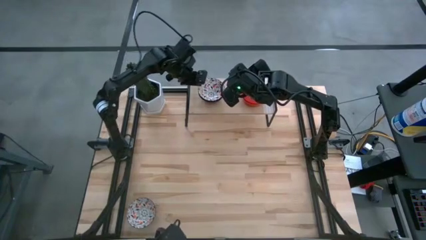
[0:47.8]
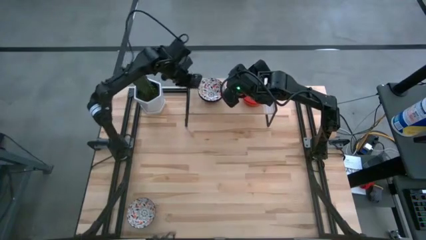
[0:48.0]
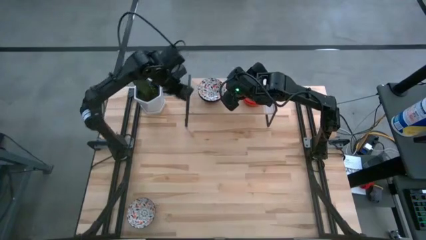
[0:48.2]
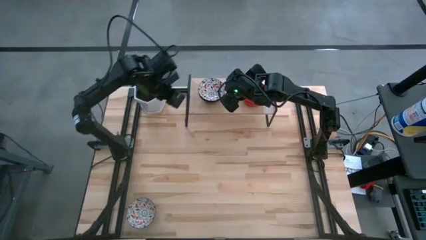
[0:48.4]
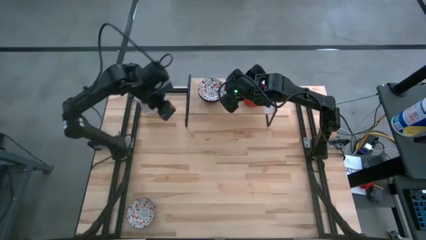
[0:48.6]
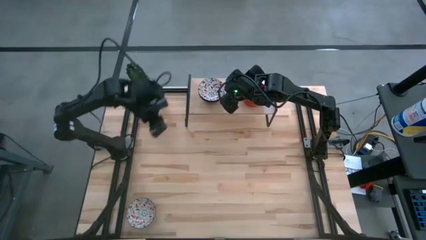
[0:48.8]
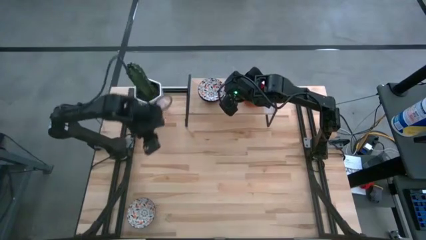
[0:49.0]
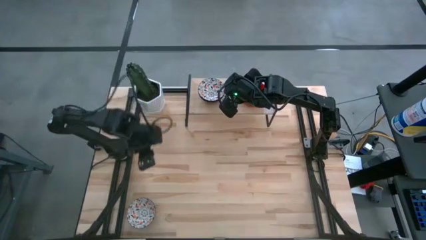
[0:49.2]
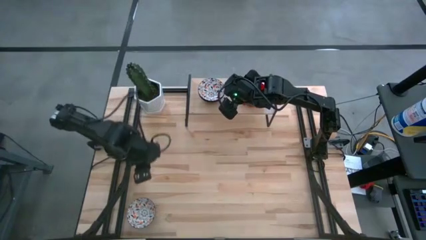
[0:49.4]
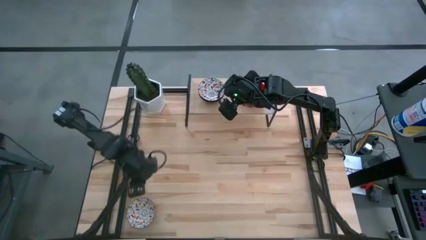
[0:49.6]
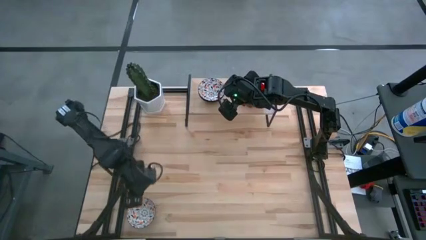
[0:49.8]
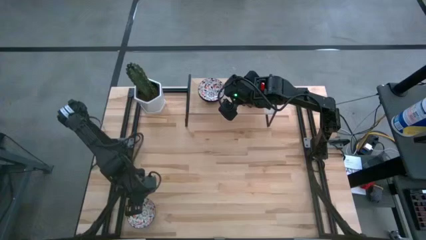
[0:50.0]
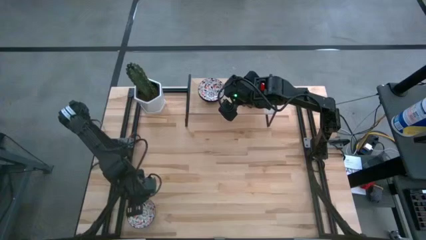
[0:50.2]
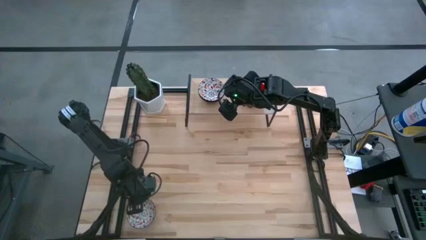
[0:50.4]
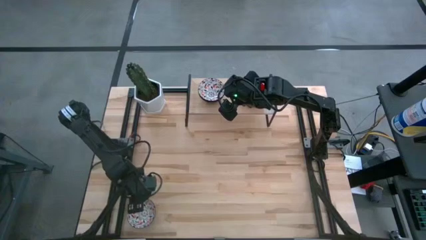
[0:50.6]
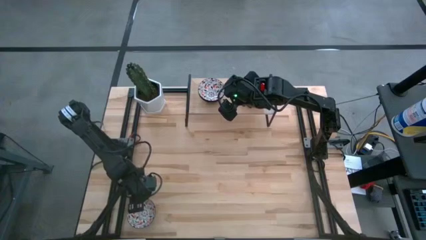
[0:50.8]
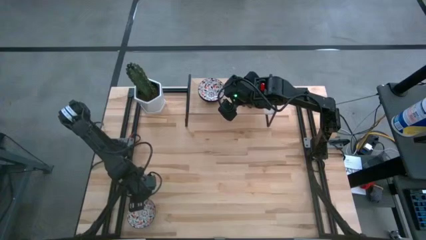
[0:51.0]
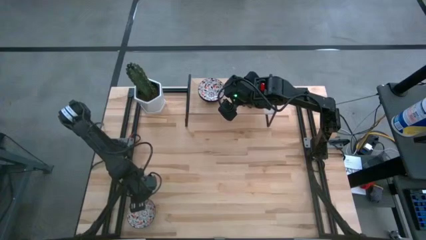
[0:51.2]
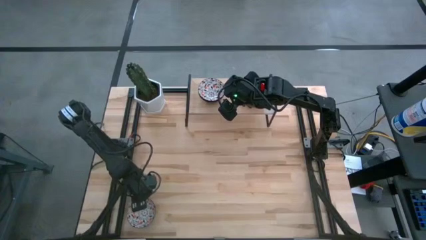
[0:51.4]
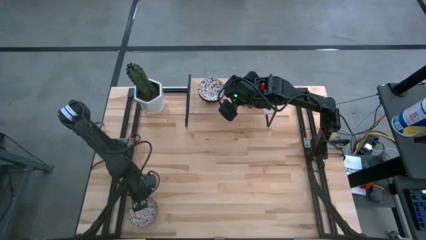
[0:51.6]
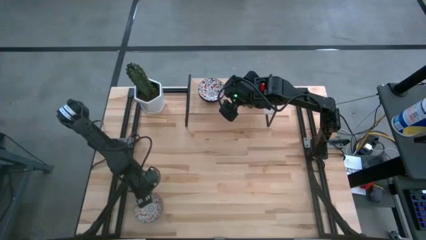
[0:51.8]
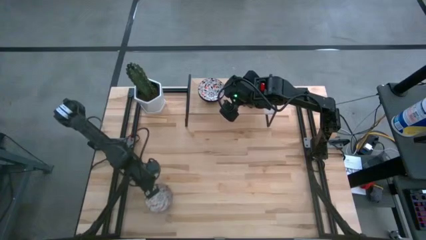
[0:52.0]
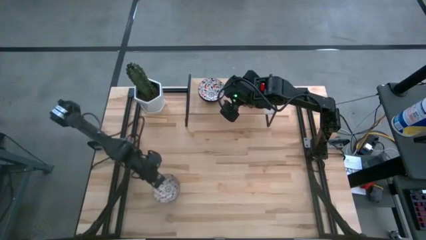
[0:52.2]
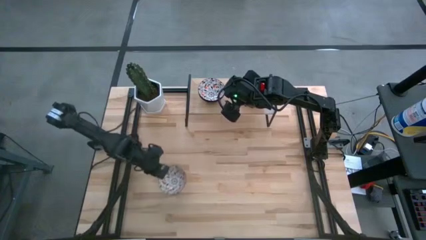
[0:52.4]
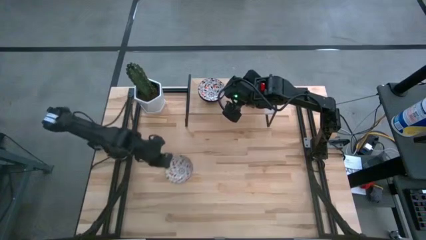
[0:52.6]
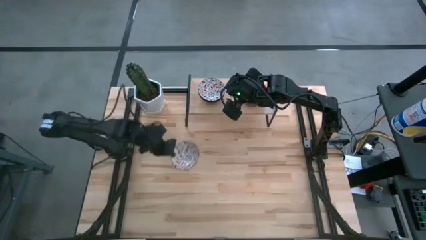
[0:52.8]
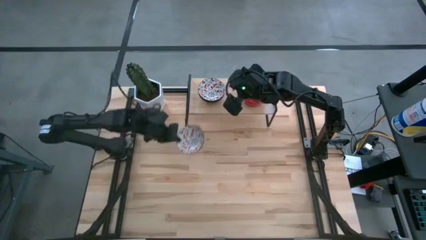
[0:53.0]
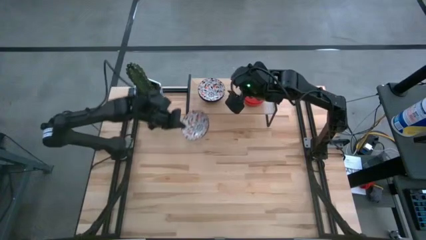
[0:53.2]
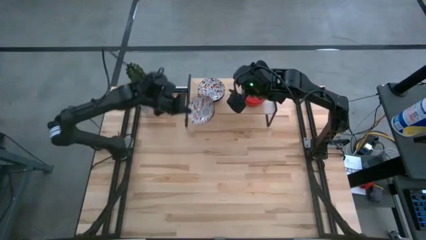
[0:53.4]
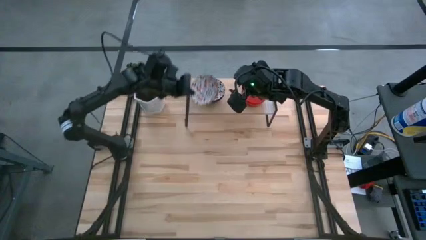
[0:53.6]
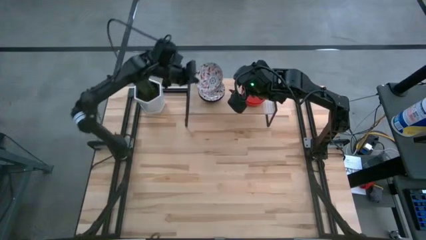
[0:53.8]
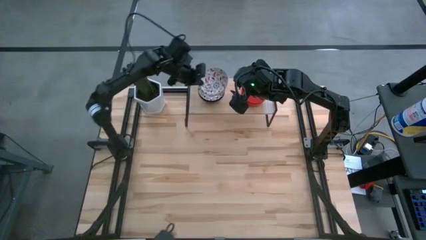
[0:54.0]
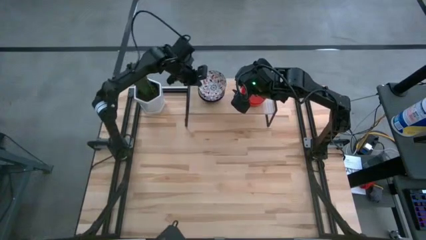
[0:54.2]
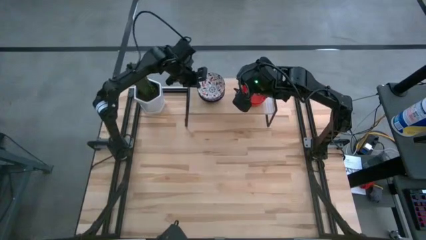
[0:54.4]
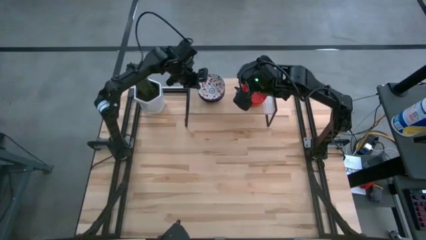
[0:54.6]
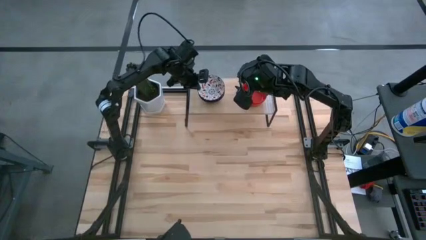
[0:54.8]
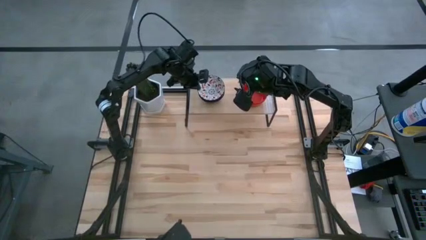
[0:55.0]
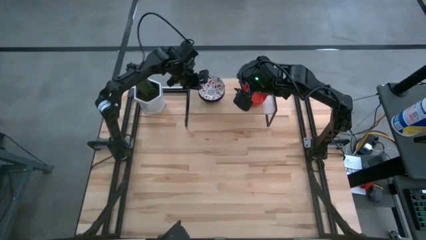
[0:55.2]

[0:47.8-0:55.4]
Task: Pick & Place Mini bowls
Stack the white patterned bowl on the white patterned bowl on the shelf

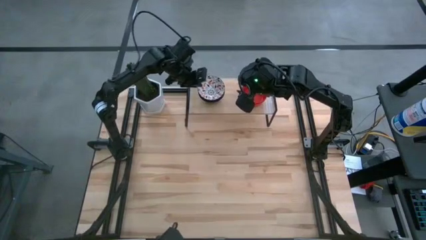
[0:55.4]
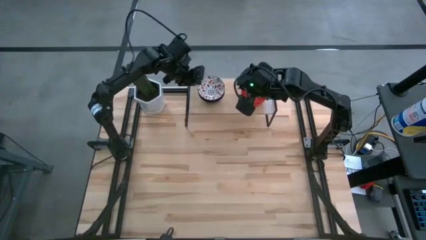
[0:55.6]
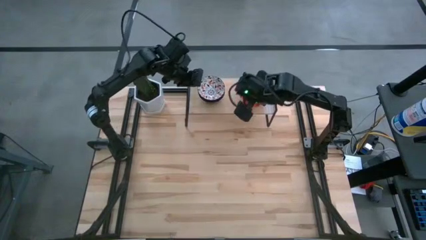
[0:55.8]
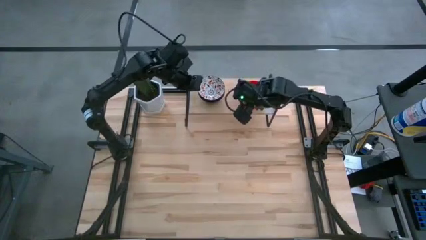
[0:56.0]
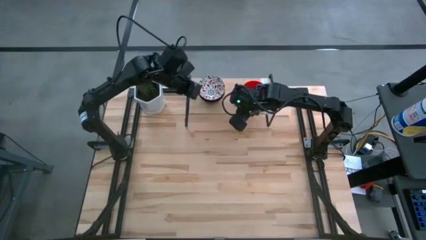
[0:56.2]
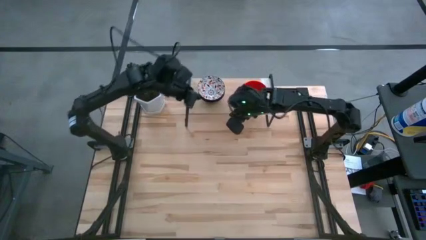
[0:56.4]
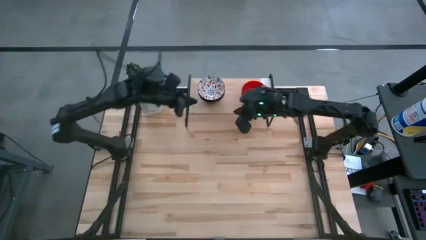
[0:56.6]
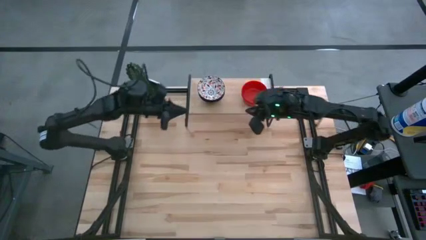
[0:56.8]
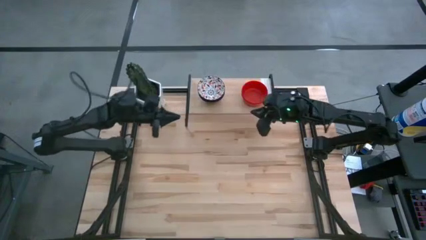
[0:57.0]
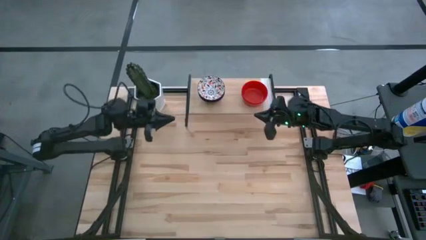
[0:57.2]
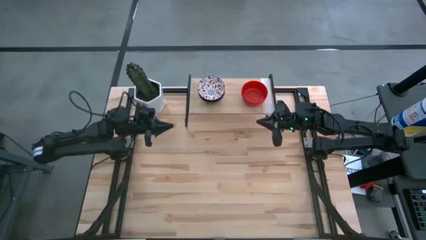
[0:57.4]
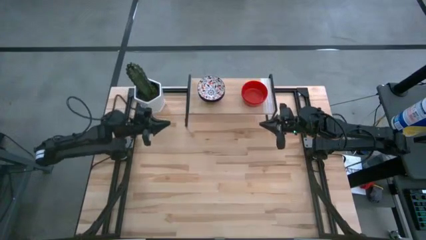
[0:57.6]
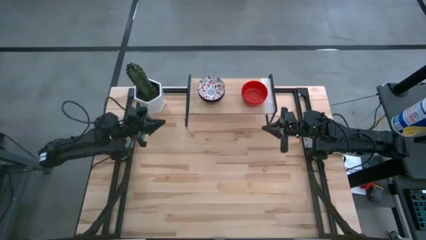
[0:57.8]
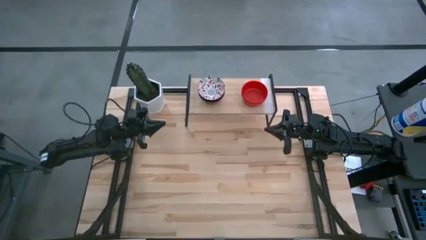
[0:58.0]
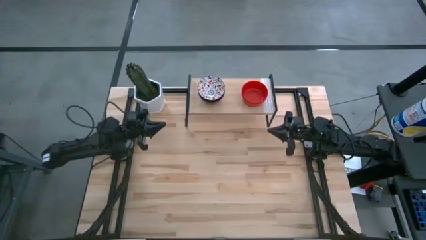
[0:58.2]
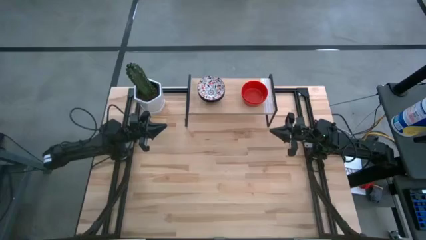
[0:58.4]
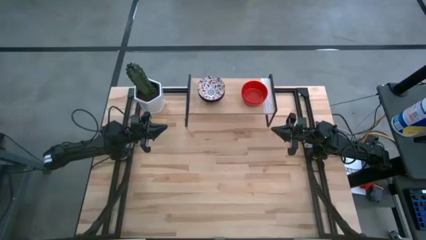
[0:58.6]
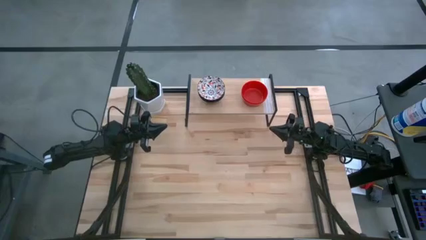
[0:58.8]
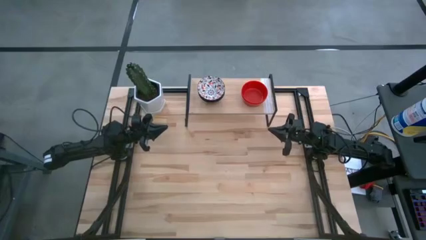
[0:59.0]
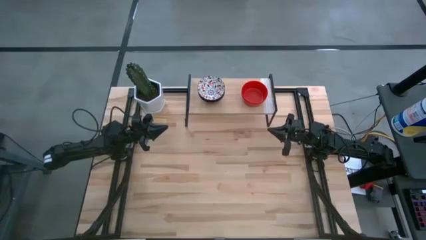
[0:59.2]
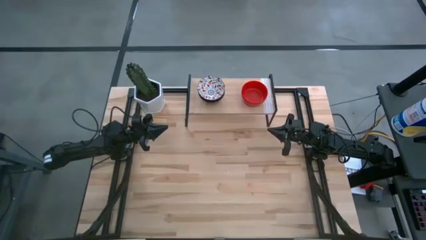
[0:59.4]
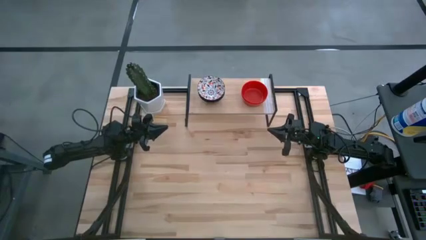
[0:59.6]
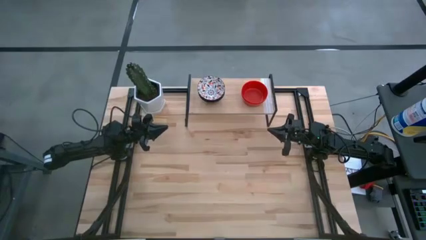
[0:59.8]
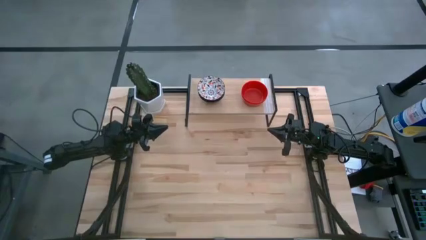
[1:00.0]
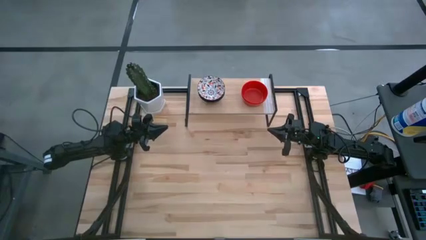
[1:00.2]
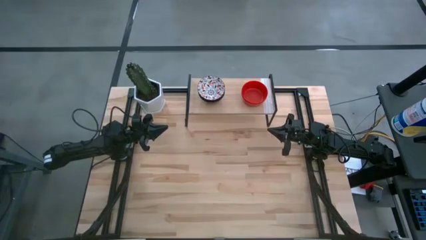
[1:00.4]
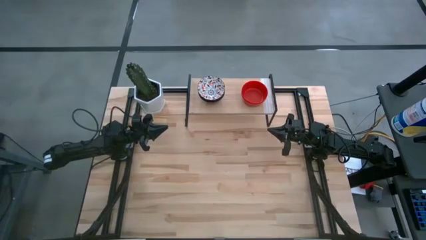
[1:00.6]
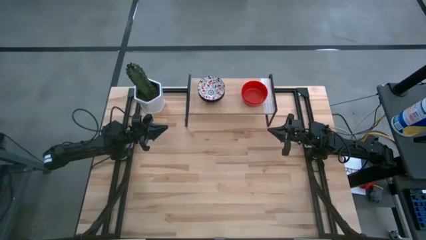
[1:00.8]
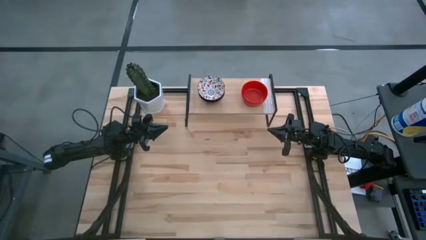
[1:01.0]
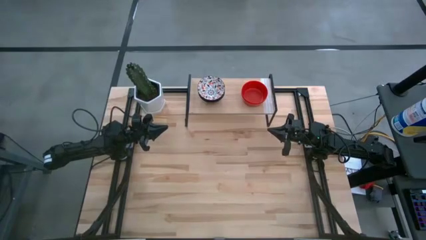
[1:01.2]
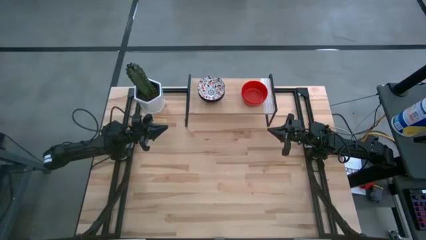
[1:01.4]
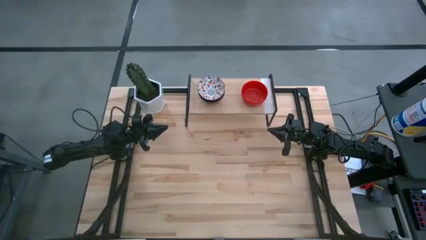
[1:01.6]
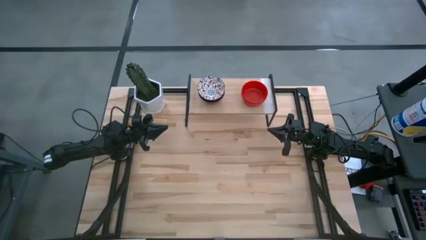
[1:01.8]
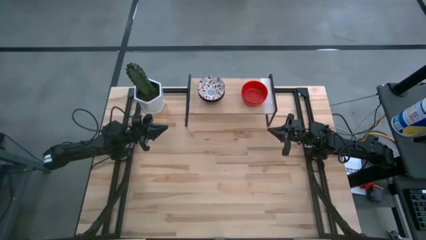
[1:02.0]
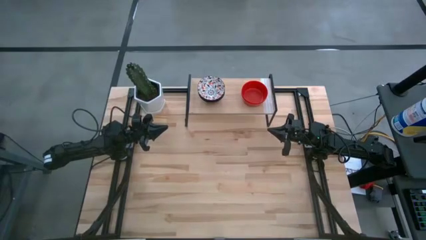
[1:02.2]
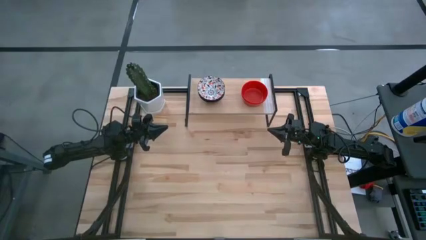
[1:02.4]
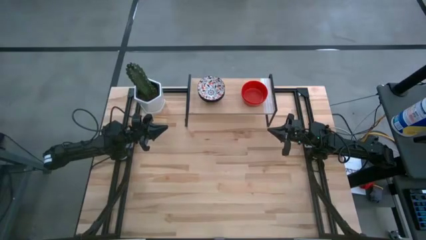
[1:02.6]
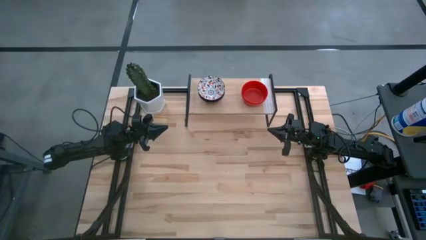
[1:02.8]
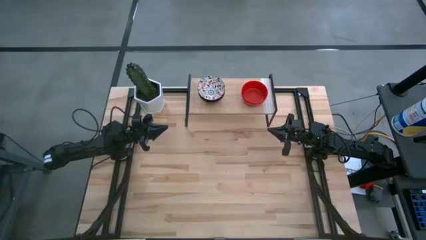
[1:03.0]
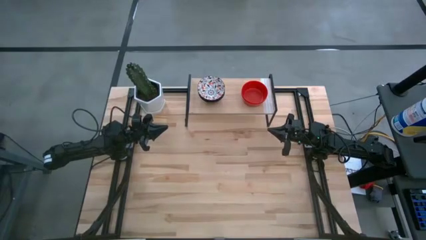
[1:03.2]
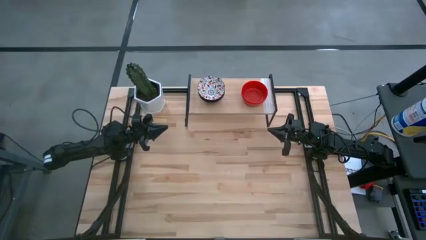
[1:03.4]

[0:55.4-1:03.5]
Return to Home Position

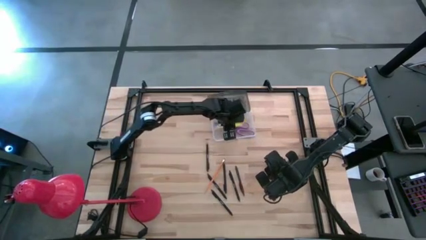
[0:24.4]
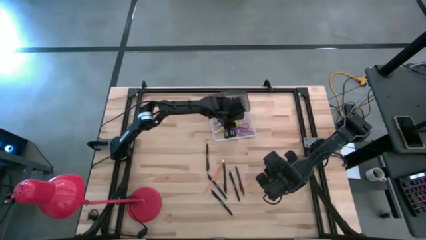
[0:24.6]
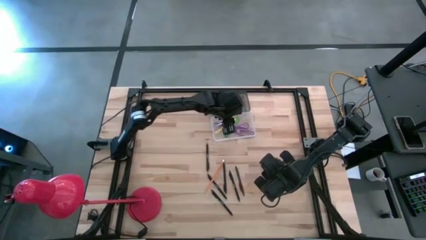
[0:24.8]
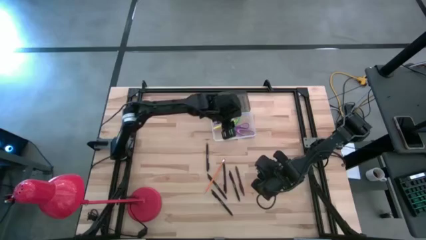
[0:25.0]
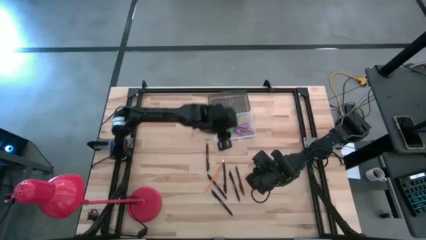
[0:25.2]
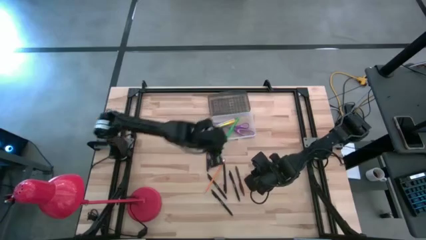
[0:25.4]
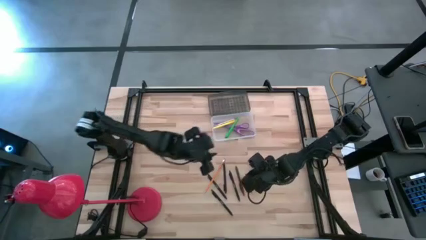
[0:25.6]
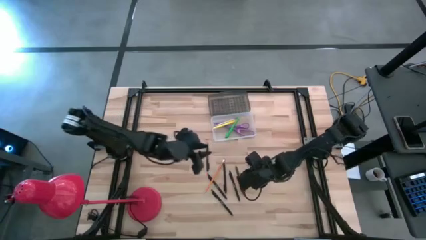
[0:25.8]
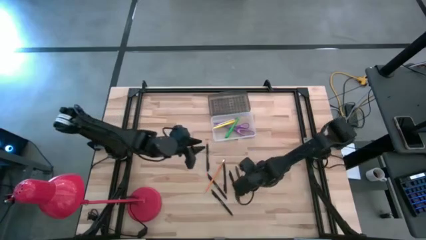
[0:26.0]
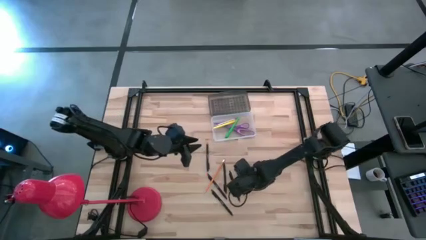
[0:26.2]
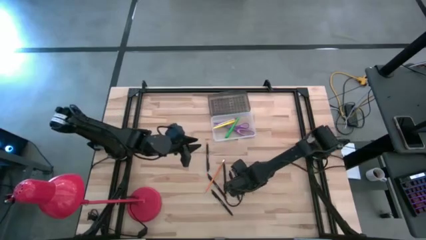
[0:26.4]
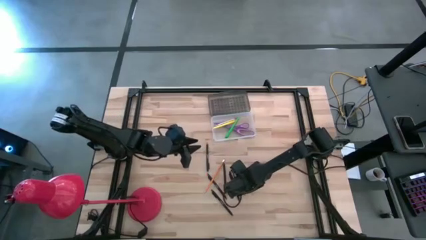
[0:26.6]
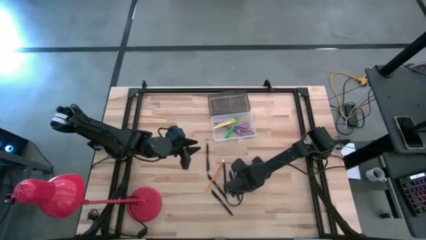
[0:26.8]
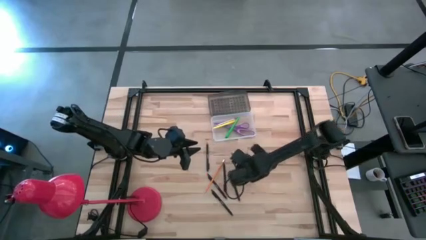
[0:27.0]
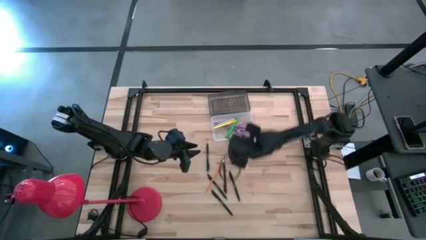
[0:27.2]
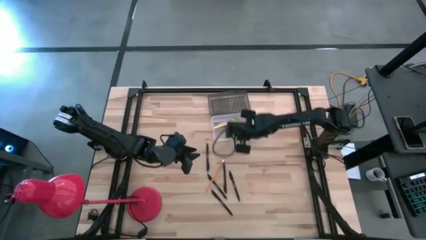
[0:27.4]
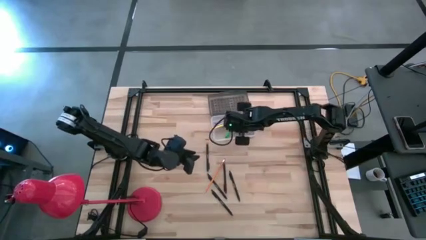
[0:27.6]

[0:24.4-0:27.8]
Task: Pick & place school supplies into a supply box
Put the brown ballpen into the gray supply box
